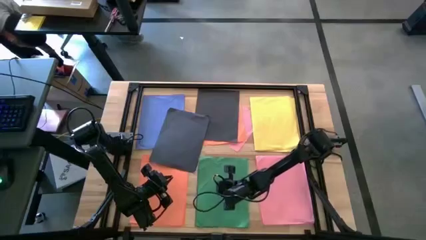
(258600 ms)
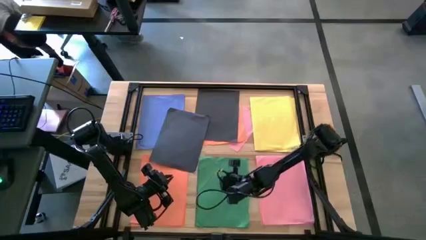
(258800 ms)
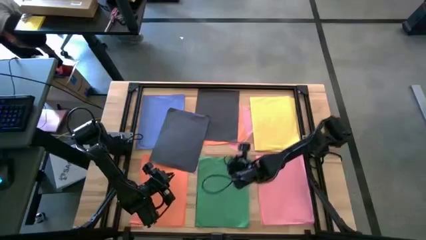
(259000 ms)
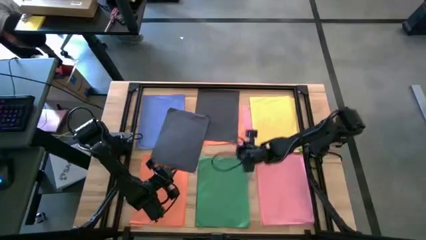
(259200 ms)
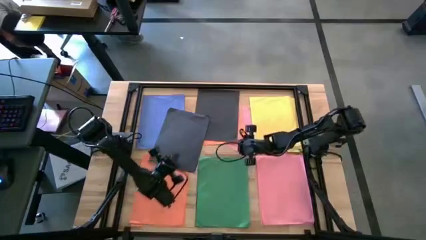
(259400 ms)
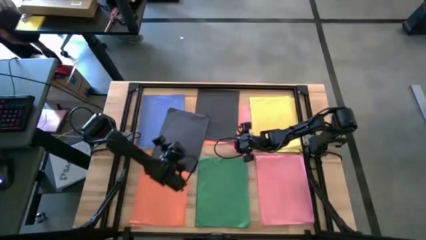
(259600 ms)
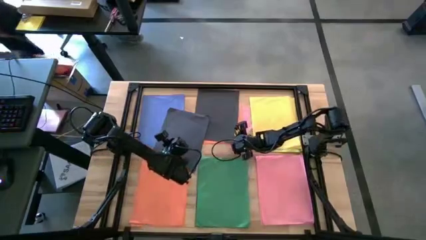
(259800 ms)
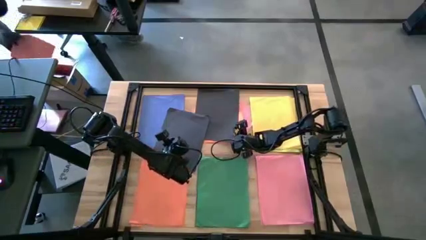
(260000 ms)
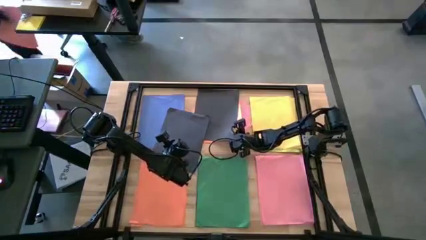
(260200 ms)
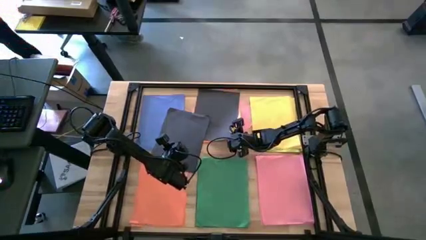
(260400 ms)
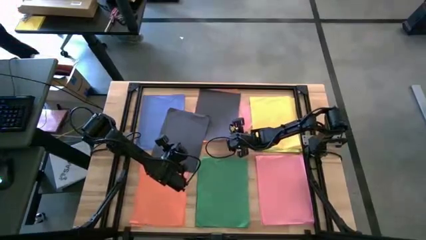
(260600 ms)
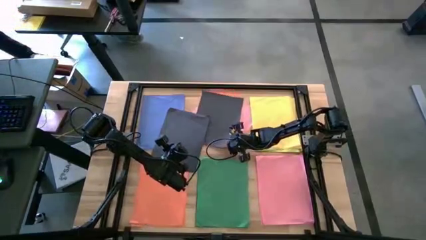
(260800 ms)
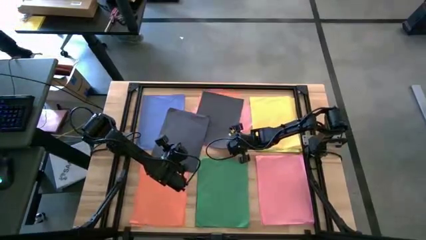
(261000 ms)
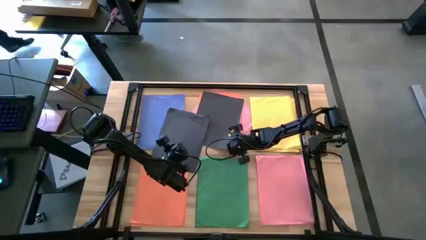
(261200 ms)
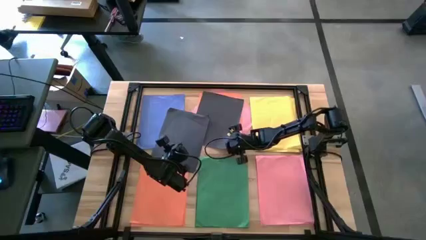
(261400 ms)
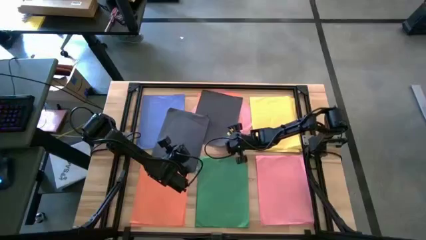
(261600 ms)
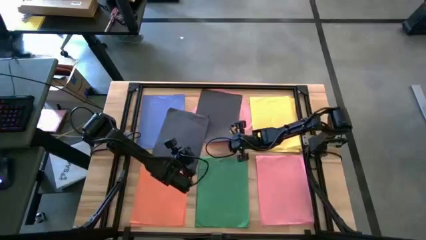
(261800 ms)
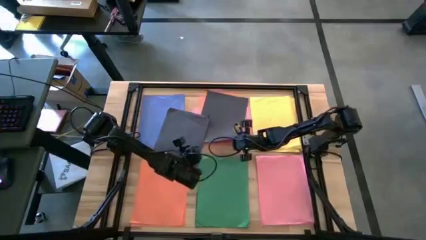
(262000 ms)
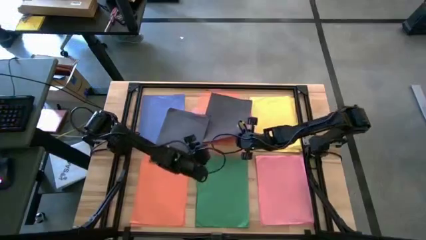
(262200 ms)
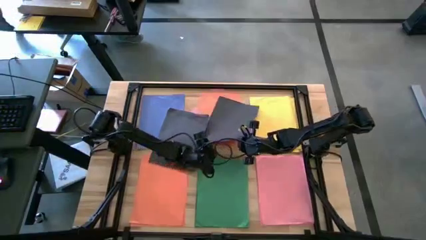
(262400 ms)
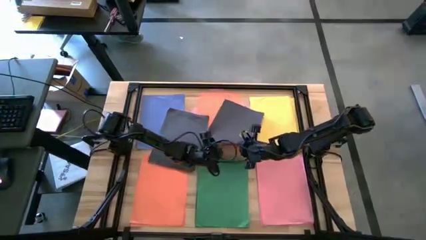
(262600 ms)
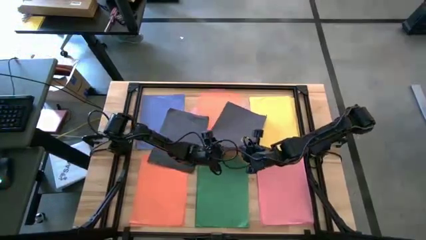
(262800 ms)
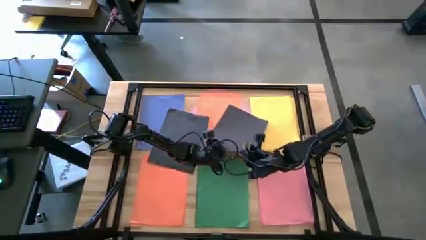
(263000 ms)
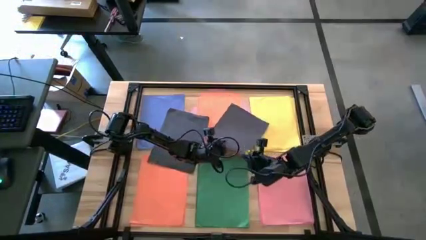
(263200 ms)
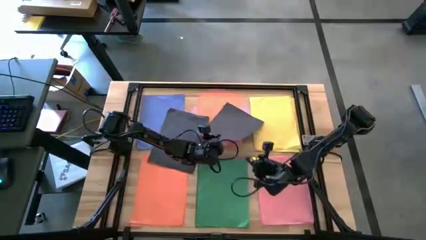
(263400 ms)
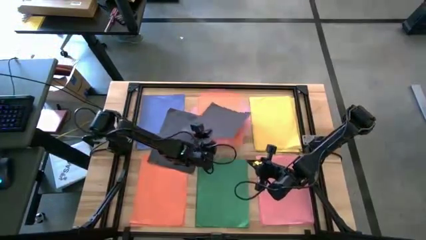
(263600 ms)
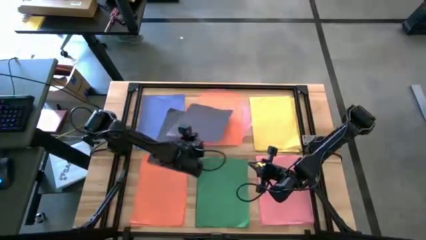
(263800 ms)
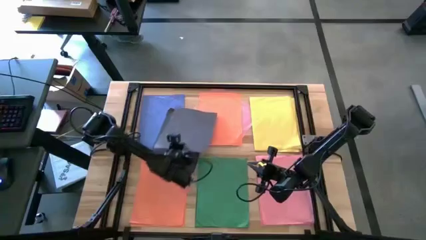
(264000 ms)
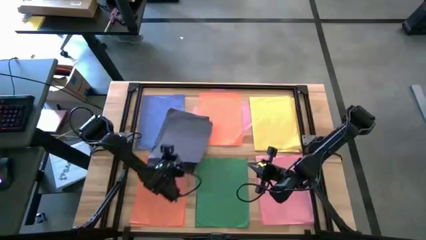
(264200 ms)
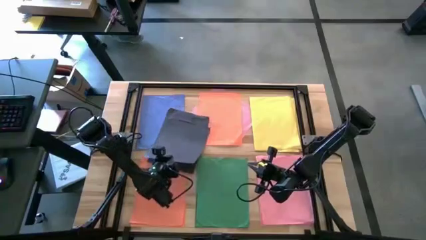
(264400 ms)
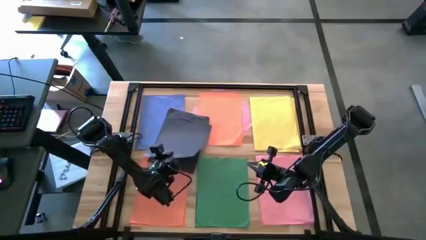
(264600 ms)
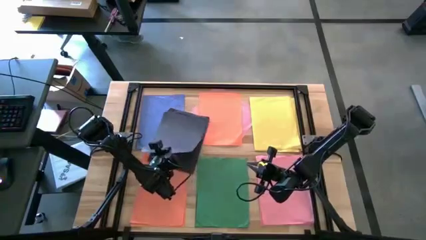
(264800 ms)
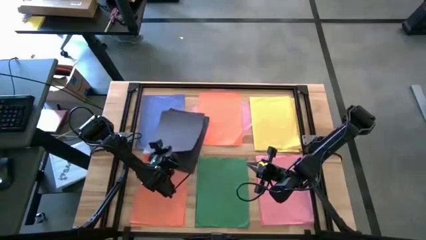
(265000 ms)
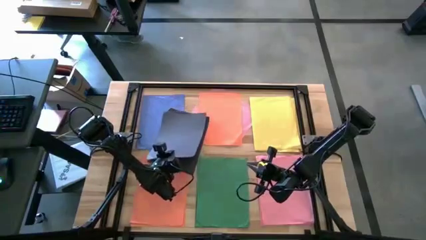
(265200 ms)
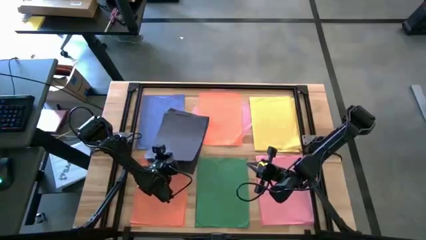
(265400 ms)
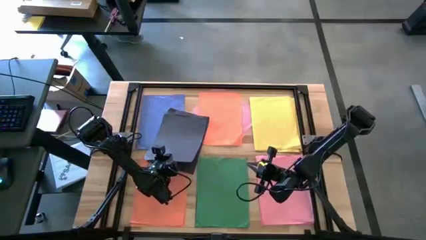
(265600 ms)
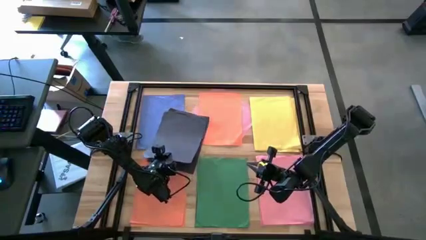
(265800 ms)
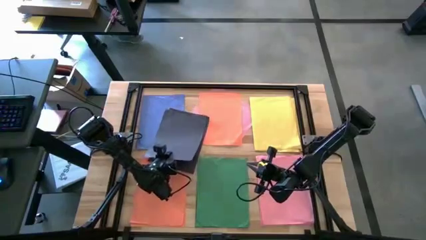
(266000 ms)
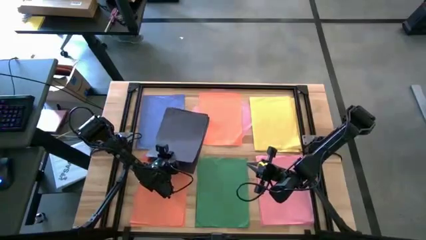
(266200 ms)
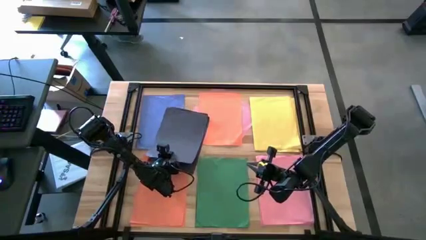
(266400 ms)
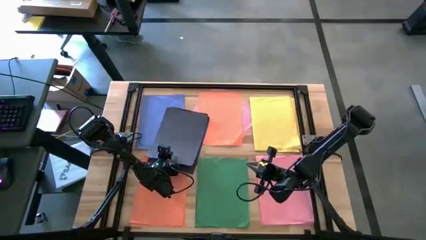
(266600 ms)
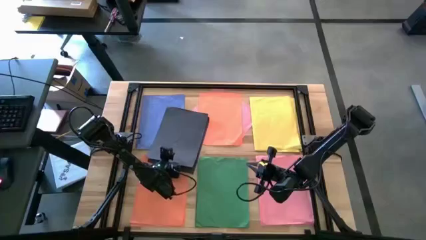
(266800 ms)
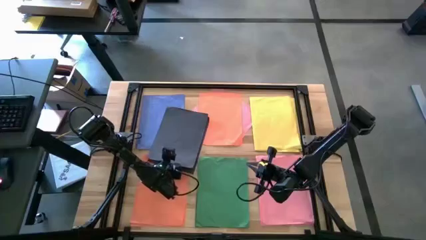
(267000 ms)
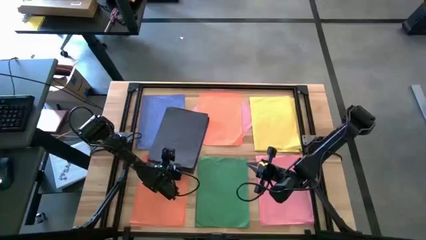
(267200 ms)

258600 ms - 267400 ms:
Task: Organize paper
Stack the right black paper on the left black paper

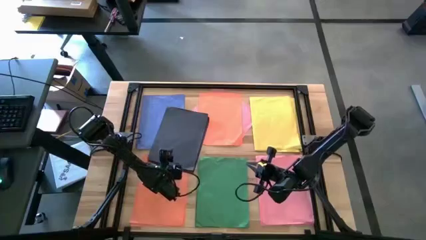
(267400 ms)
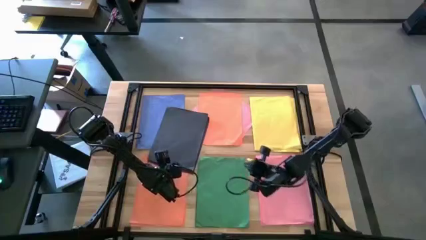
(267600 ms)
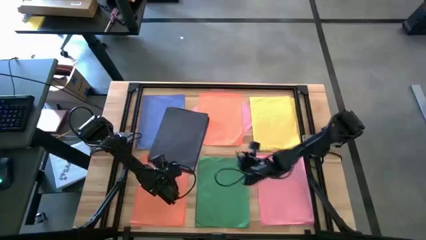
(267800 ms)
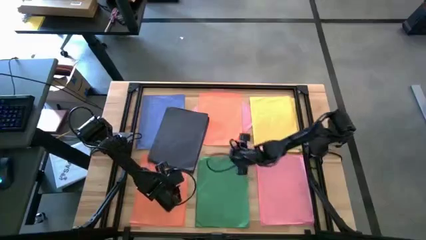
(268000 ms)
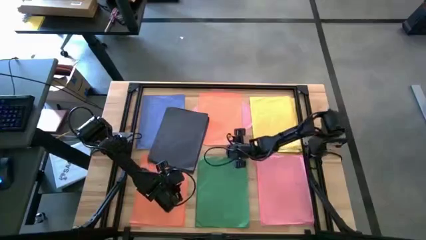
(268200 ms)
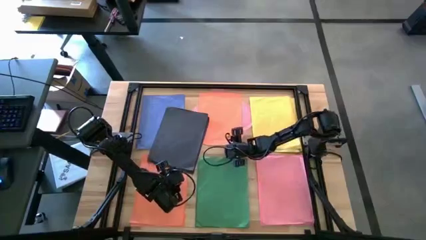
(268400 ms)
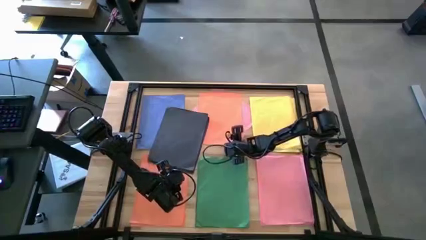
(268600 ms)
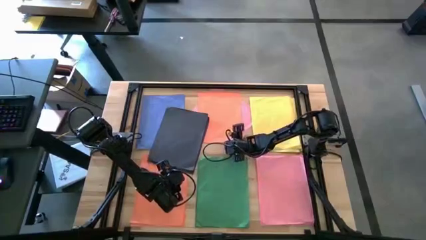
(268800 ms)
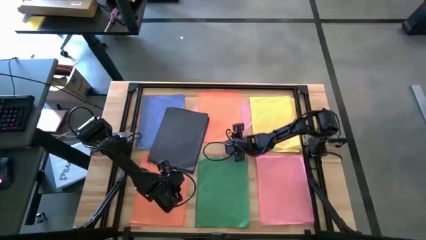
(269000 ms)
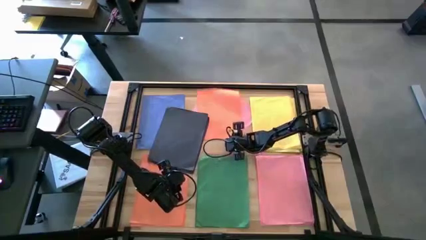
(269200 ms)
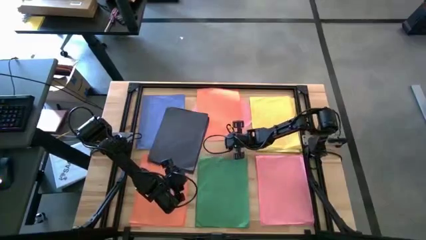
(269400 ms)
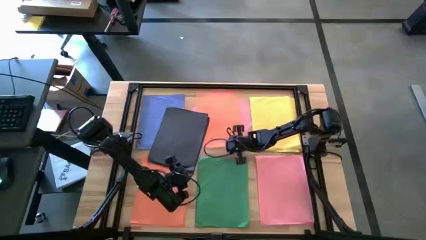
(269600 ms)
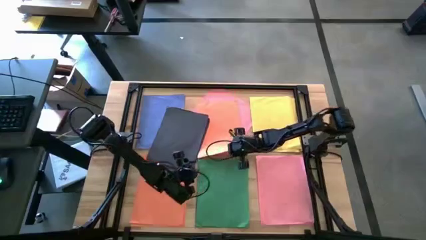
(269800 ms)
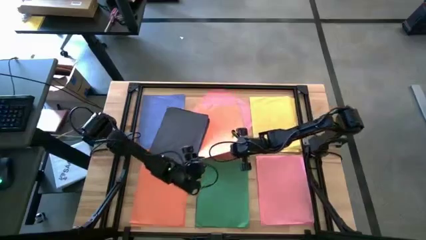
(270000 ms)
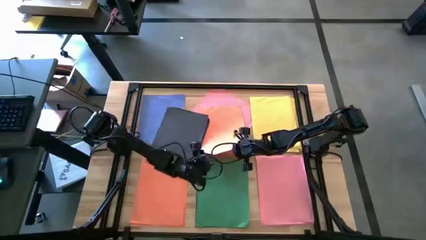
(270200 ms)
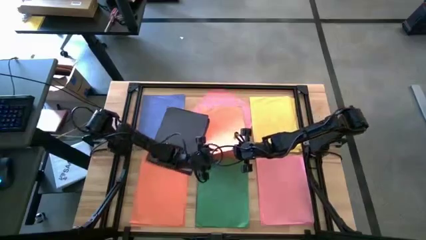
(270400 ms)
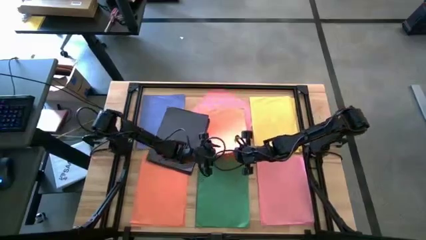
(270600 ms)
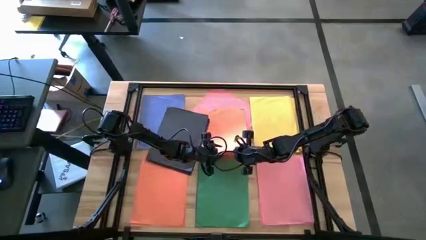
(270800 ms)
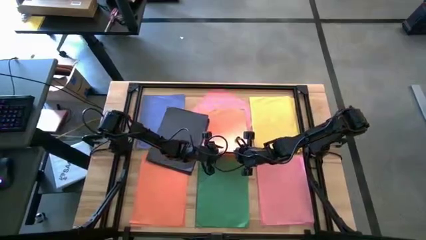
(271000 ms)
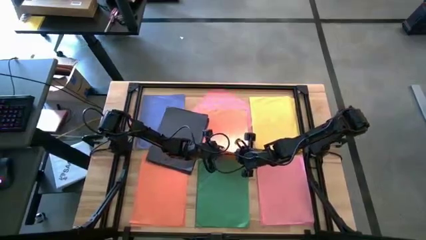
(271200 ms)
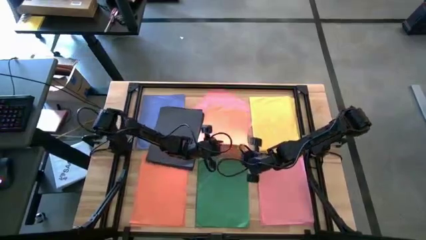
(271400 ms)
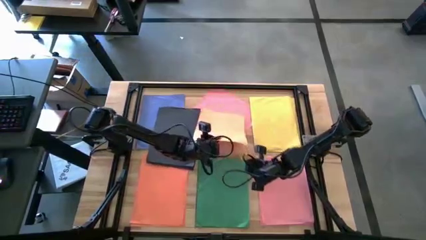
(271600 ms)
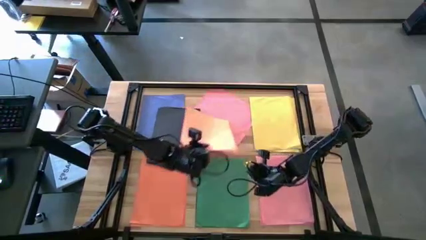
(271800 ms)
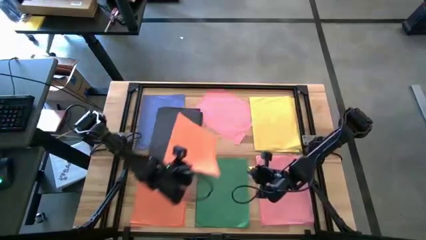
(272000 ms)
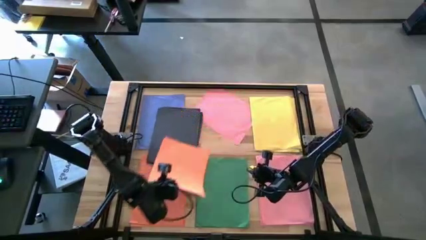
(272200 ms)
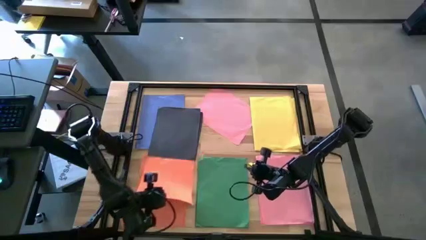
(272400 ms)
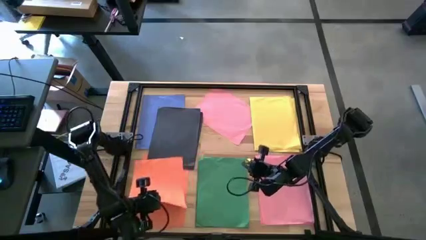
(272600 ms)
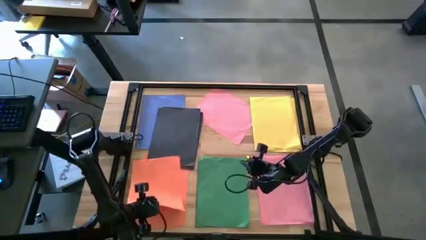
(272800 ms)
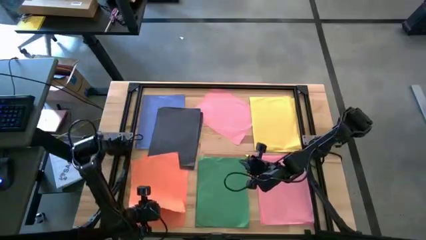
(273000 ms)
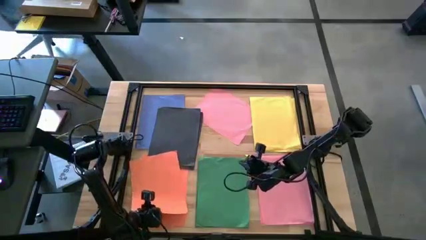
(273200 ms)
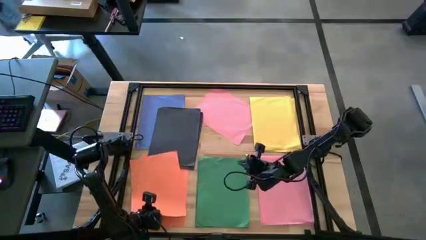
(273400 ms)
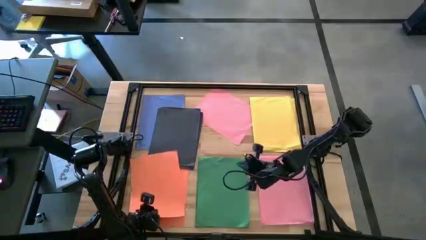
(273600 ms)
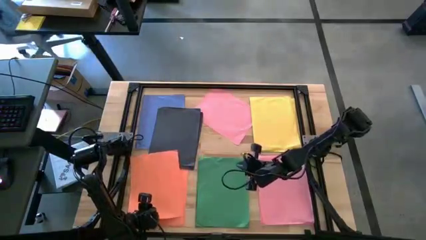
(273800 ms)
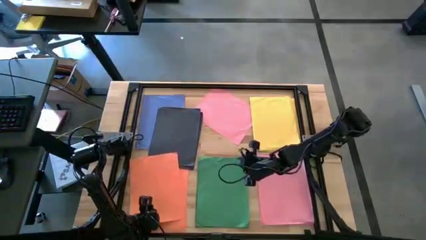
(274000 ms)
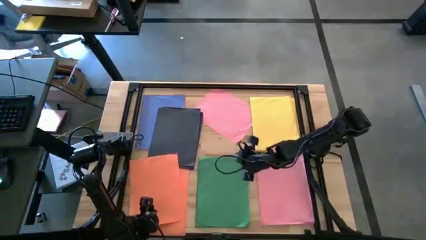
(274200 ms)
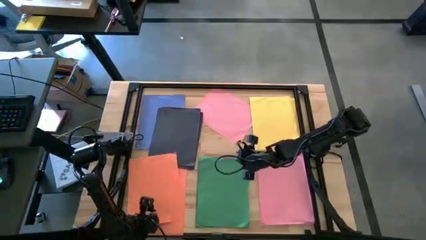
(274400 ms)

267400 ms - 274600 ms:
Stack the top orange paper on the bottom orange paper
